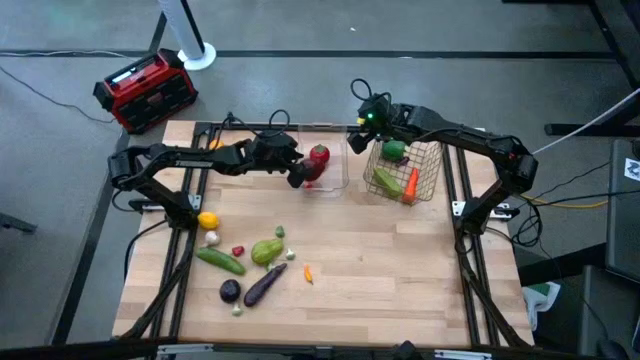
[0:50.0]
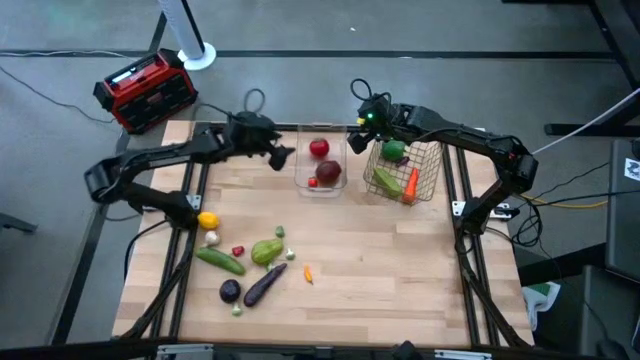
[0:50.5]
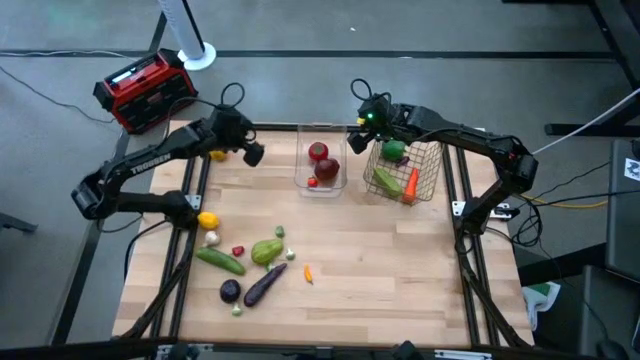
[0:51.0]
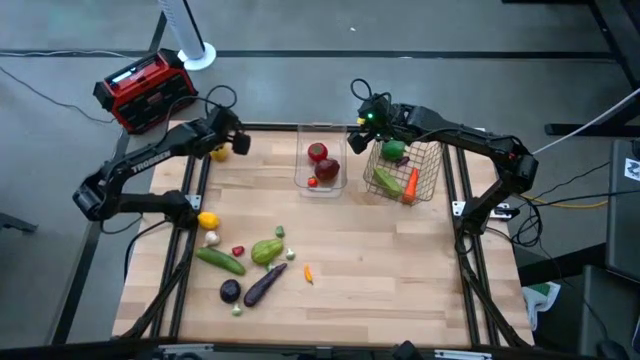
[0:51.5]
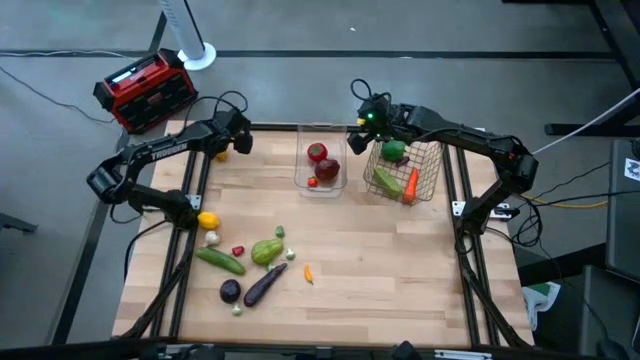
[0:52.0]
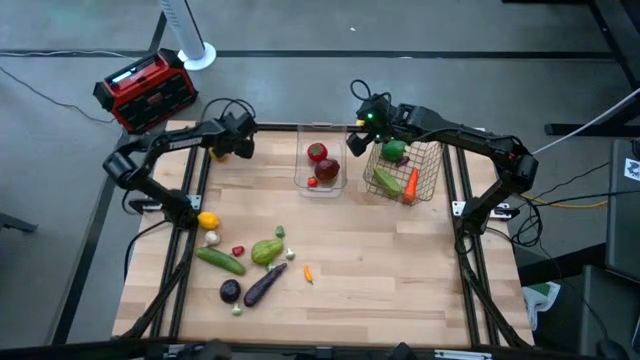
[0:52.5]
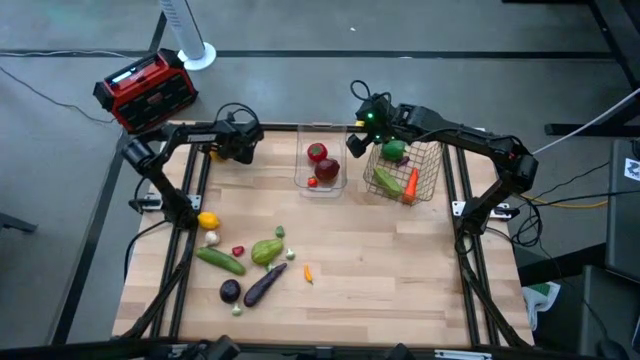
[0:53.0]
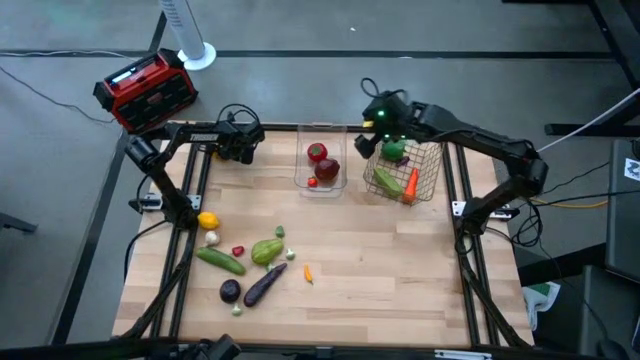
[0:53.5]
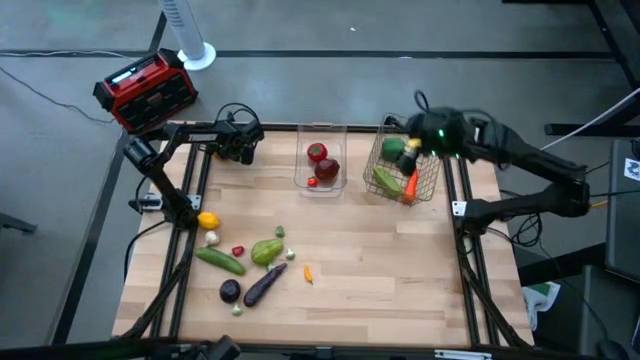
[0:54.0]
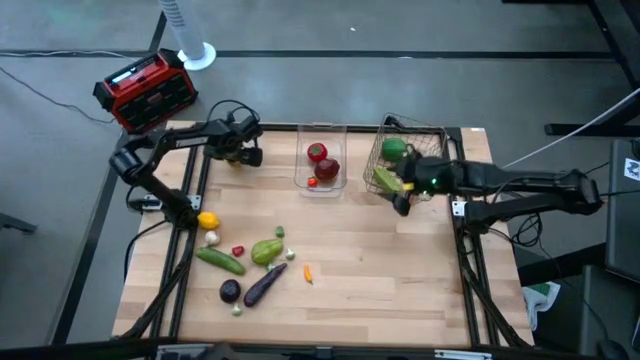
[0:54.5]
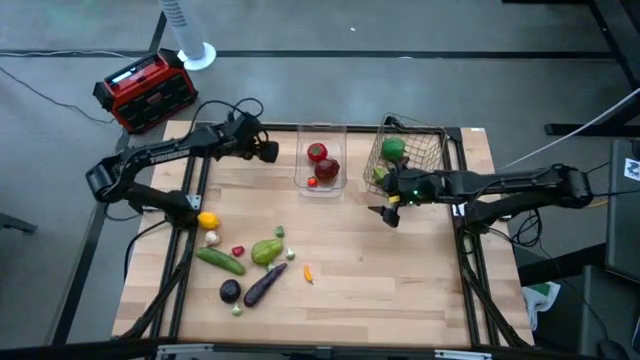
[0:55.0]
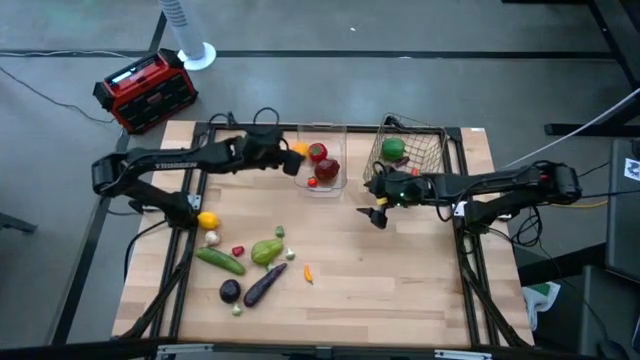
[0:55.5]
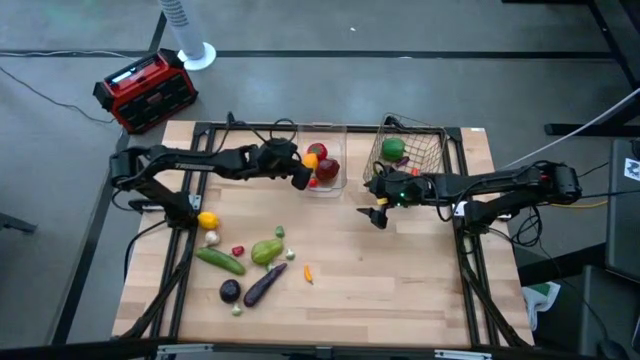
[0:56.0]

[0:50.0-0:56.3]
Task: Sort produce into baskets
Put the yellow lemon into the transparent bin

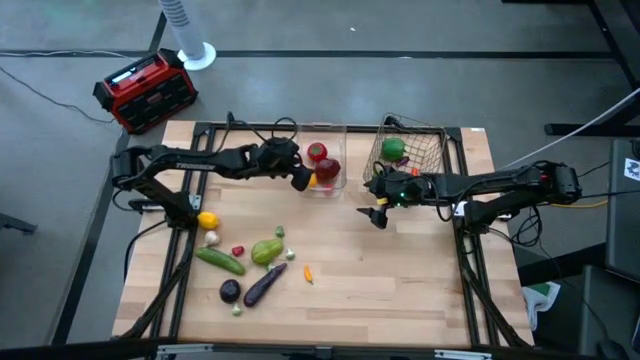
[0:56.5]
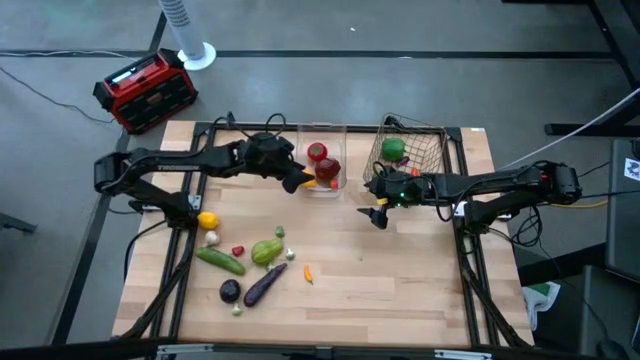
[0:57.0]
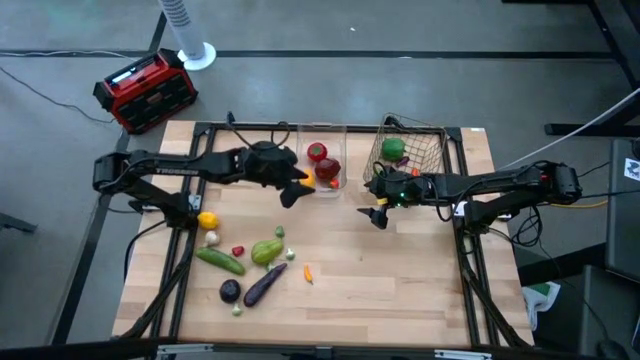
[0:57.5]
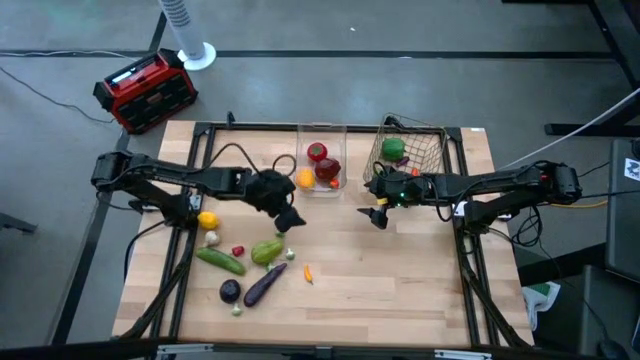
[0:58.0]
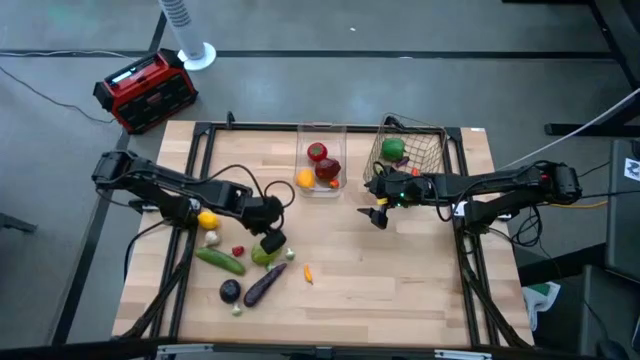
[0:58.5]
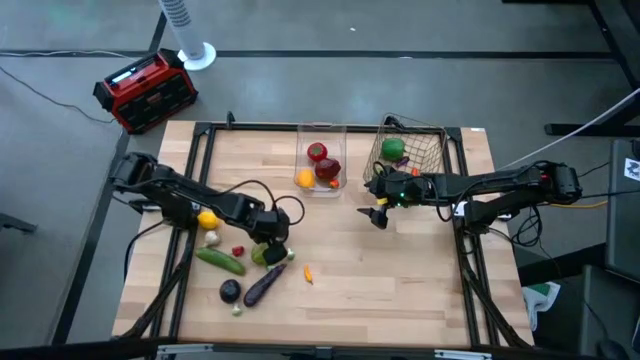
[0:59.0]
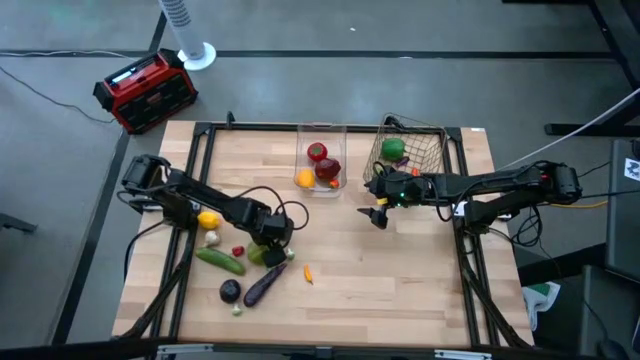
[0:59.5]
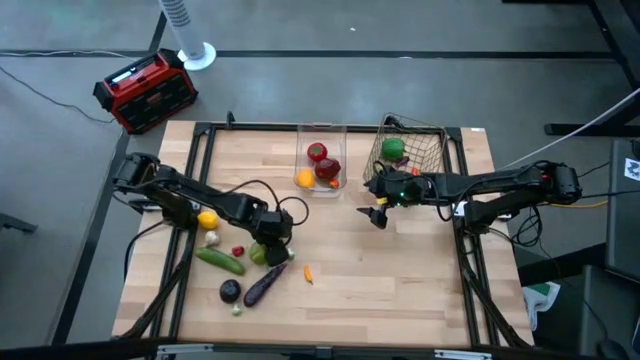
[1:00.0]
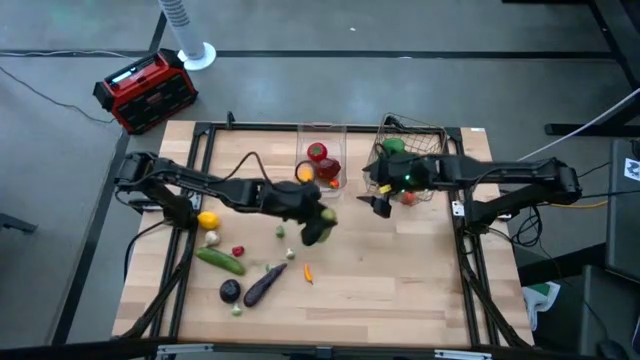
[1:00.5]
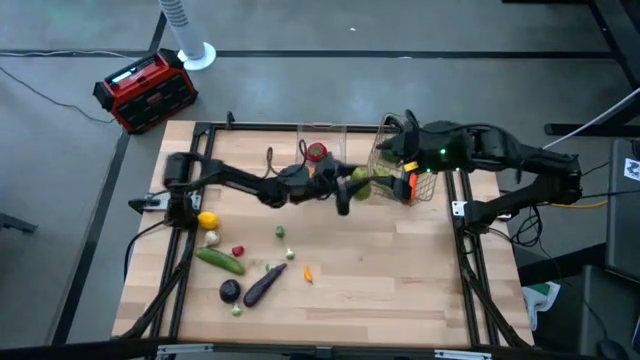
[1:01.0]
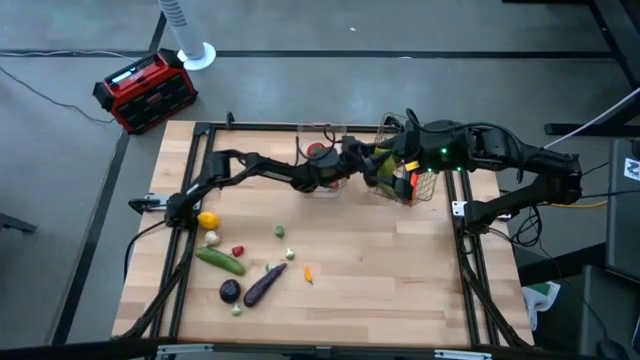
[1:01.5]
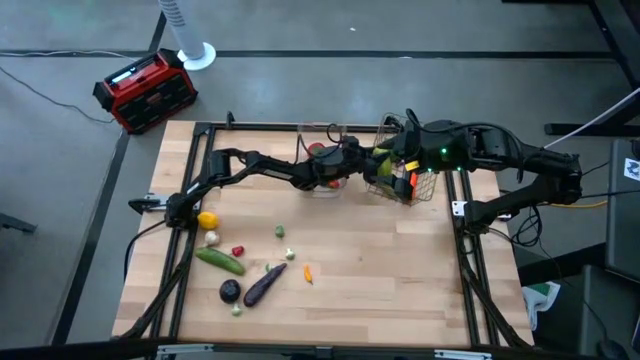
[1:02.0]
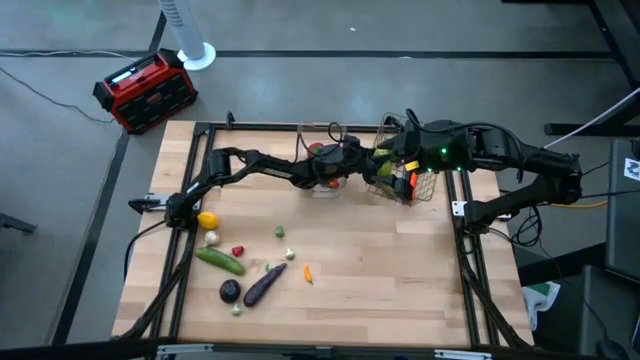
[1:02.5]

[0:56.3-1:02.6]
Put the light green chayote into the wire basket

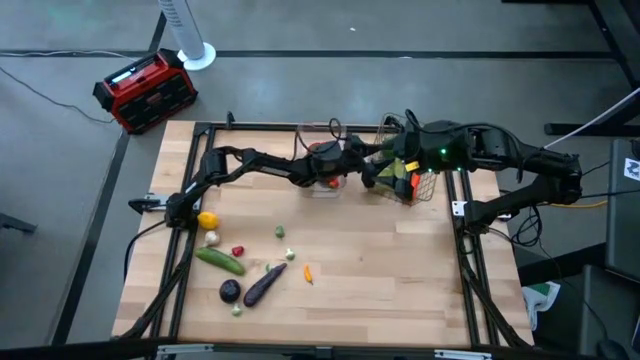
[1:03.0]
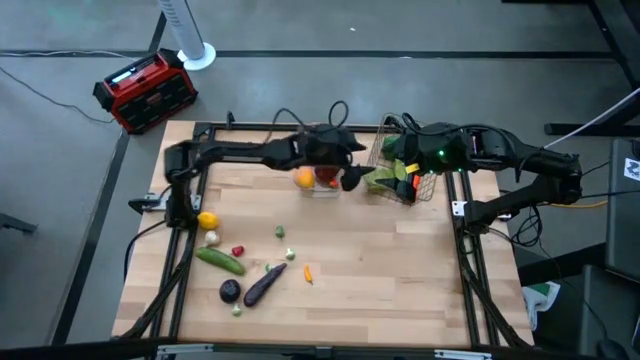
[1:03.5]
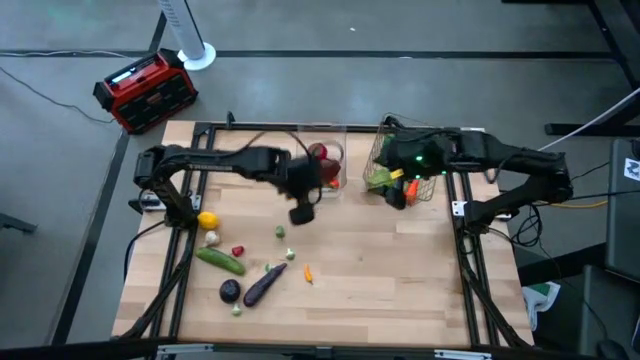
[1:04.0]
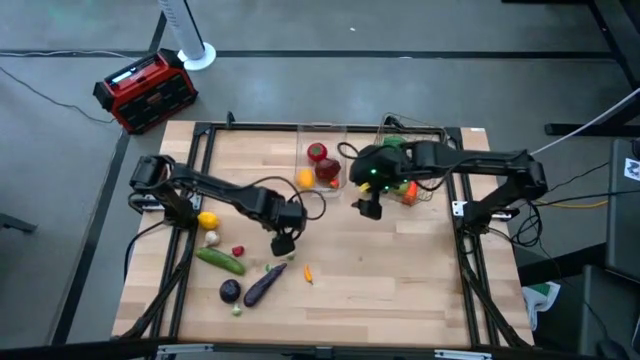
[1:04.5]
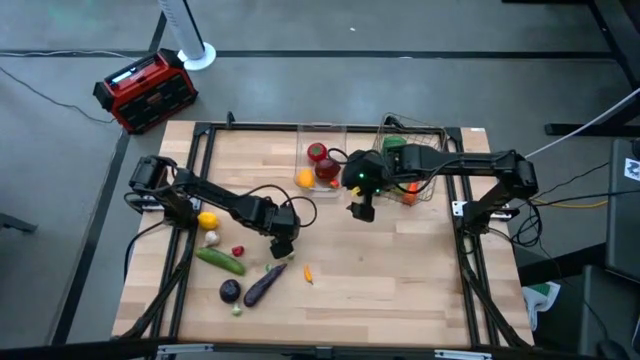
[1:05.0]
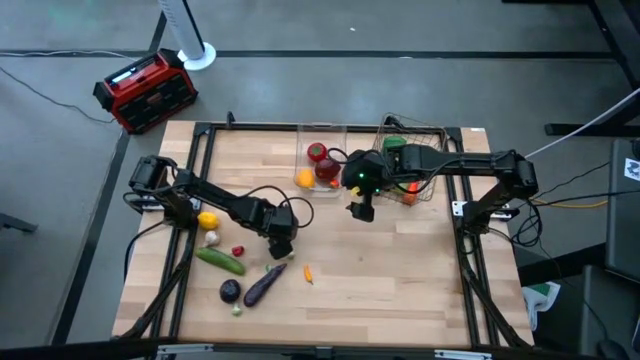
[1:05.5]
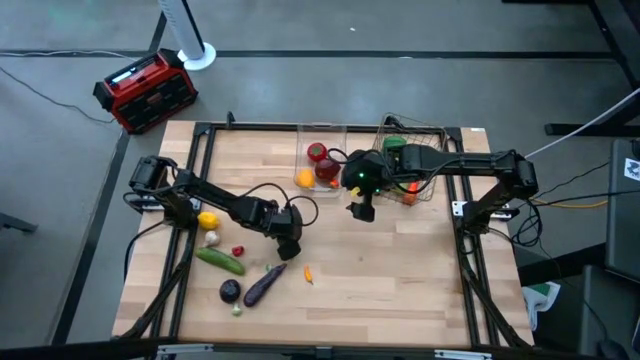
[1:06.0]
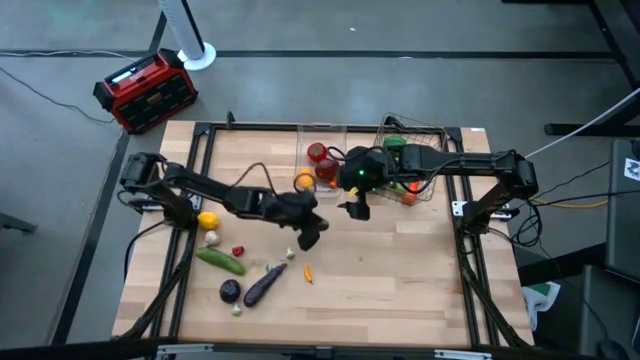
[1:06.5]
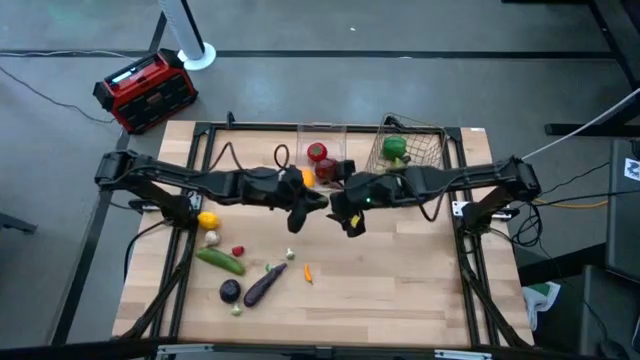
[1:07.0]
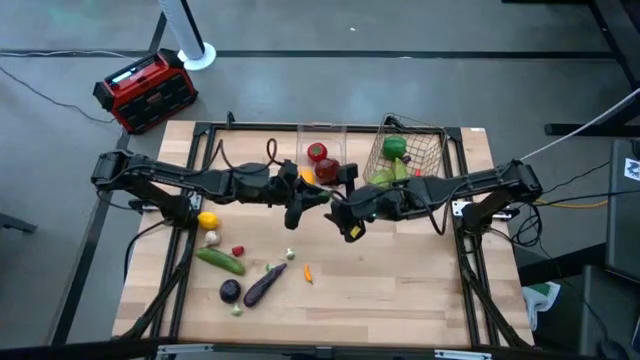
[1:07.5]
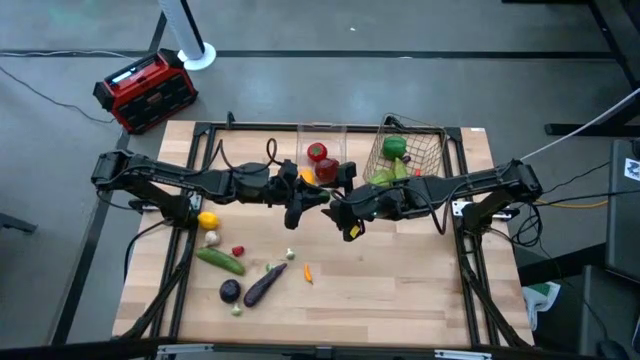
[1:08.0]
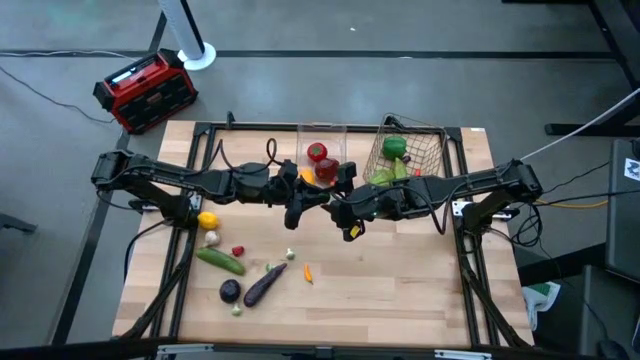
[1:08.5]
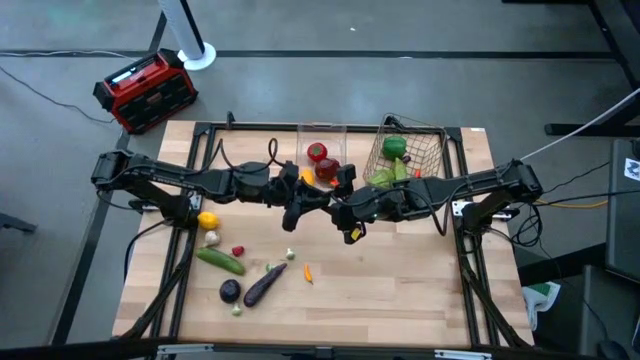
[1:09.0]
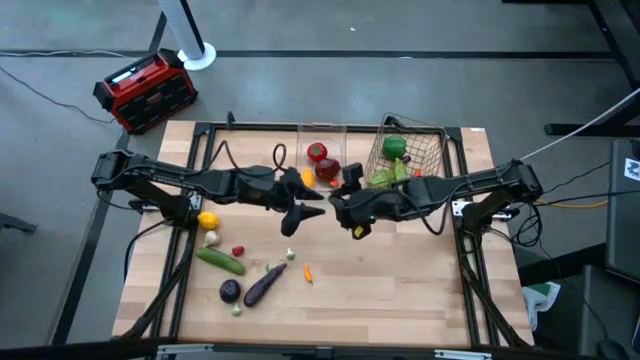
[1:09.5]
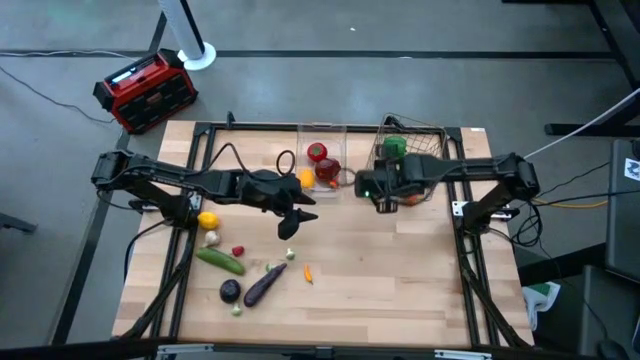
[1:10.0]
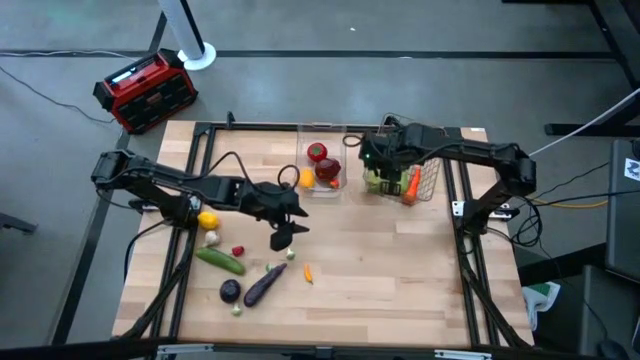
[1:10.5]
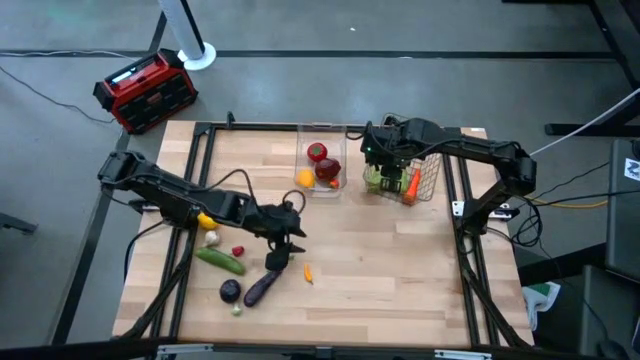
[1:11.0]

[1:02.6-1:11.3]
Put the green chili pepper into the wire basket
